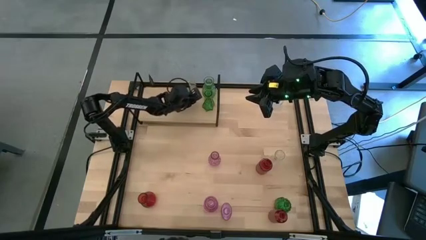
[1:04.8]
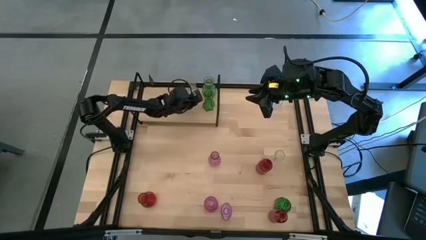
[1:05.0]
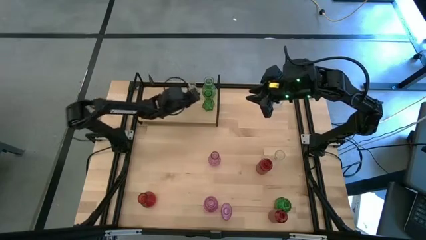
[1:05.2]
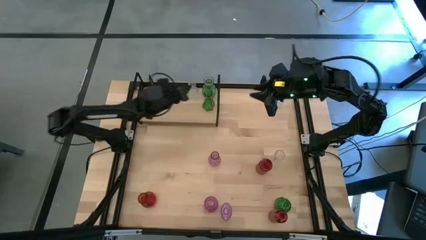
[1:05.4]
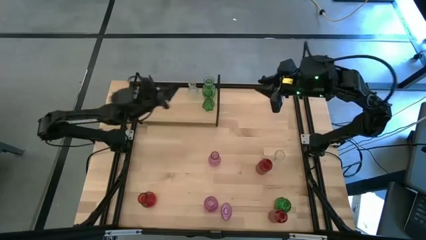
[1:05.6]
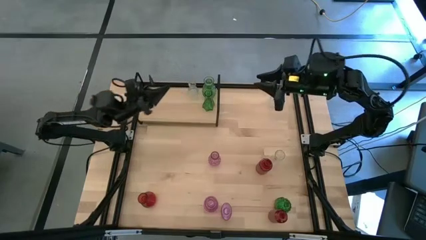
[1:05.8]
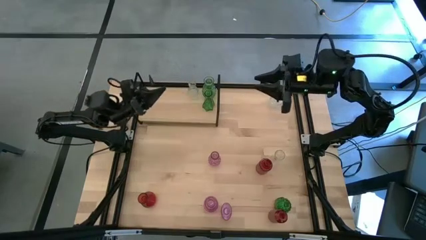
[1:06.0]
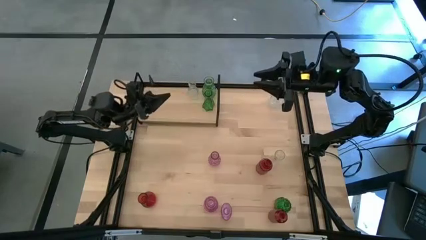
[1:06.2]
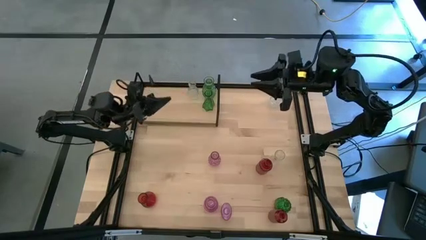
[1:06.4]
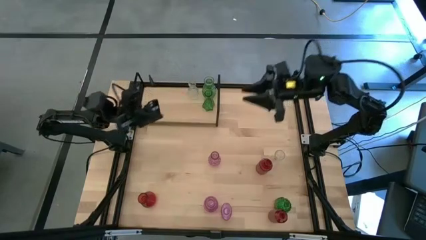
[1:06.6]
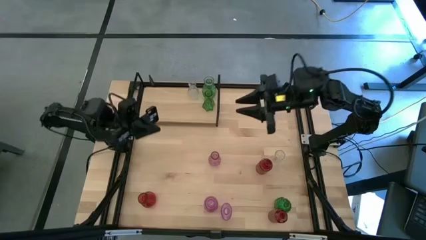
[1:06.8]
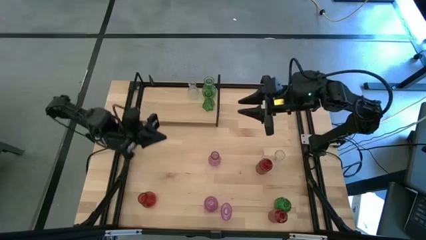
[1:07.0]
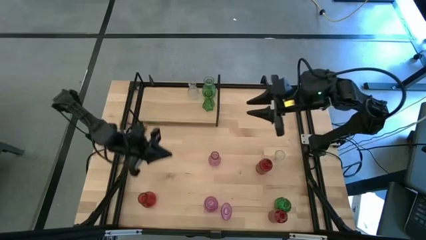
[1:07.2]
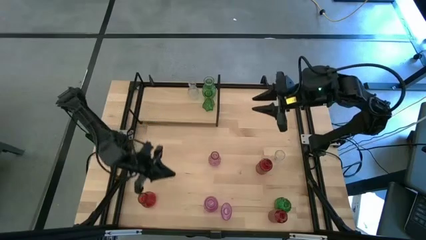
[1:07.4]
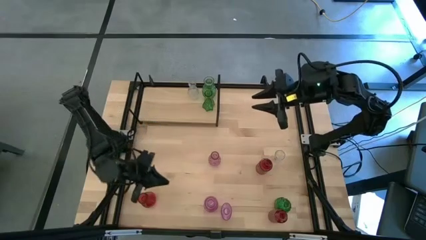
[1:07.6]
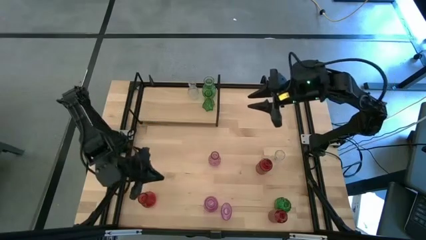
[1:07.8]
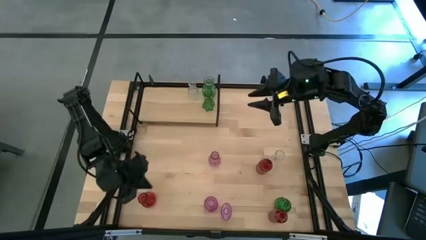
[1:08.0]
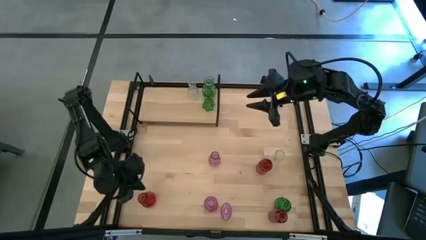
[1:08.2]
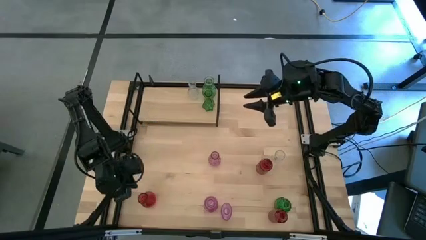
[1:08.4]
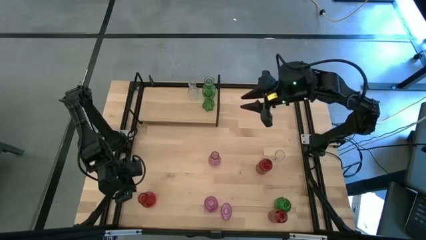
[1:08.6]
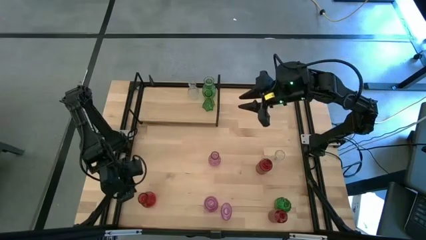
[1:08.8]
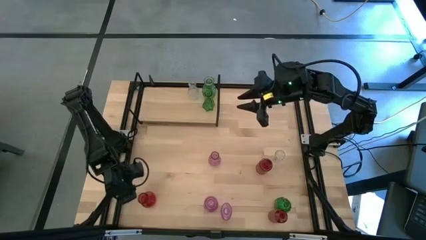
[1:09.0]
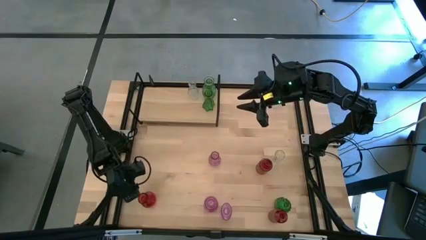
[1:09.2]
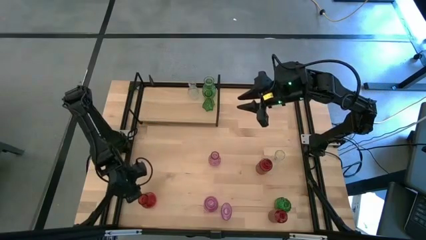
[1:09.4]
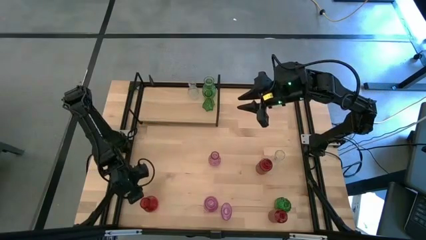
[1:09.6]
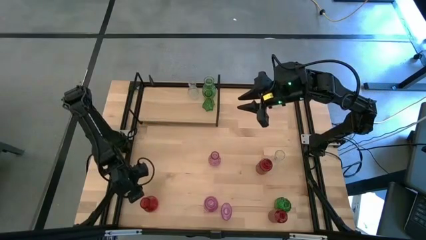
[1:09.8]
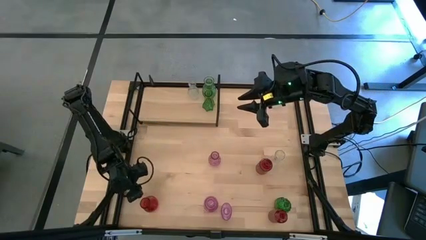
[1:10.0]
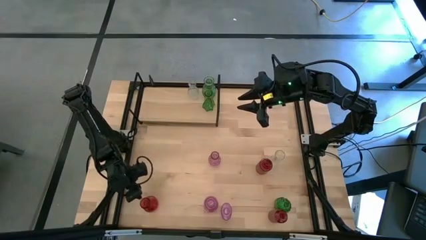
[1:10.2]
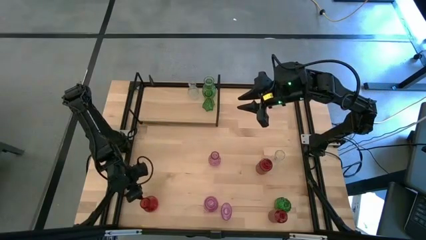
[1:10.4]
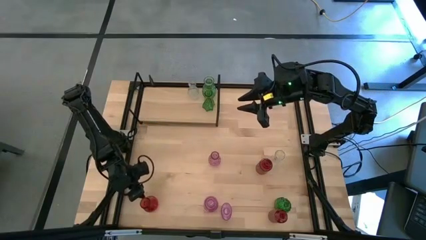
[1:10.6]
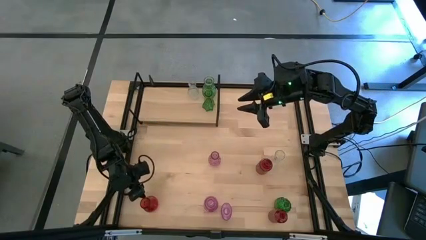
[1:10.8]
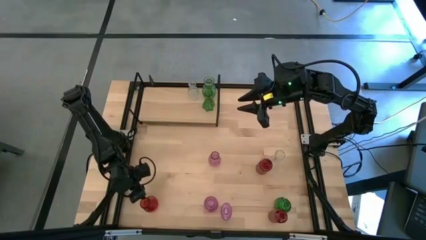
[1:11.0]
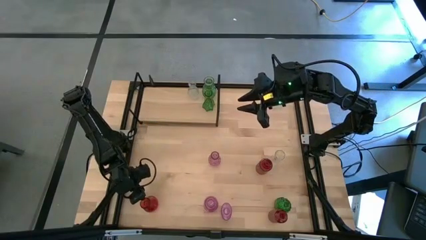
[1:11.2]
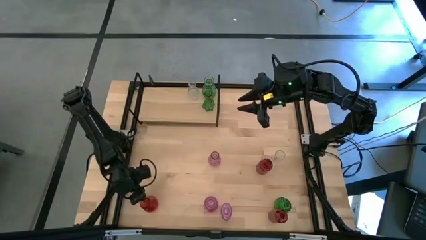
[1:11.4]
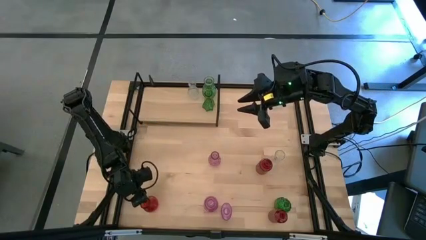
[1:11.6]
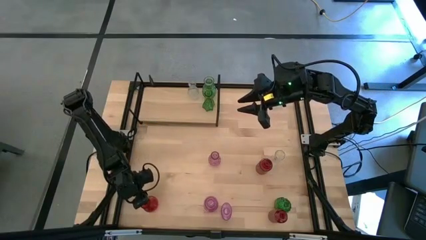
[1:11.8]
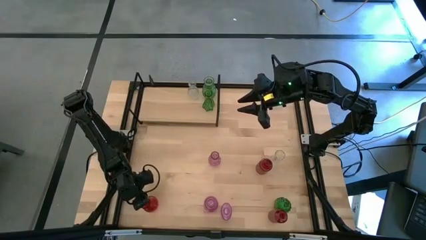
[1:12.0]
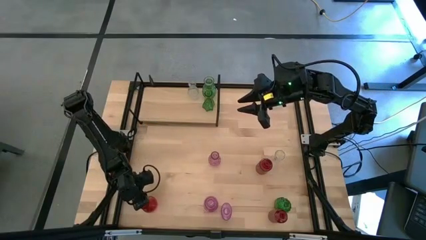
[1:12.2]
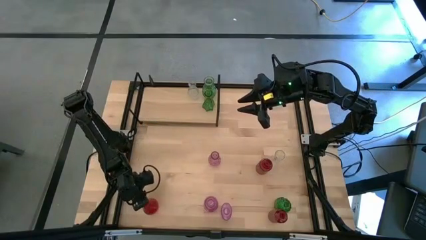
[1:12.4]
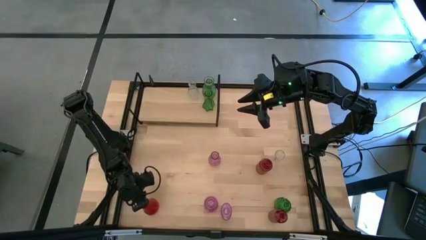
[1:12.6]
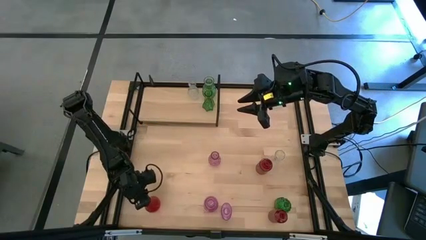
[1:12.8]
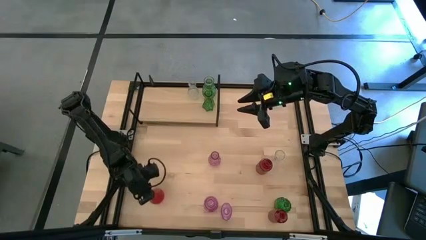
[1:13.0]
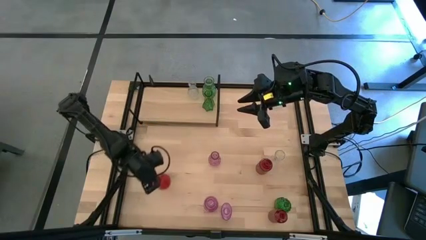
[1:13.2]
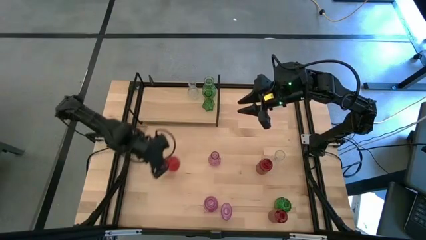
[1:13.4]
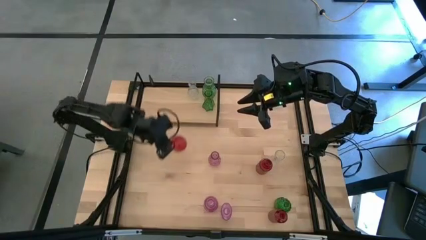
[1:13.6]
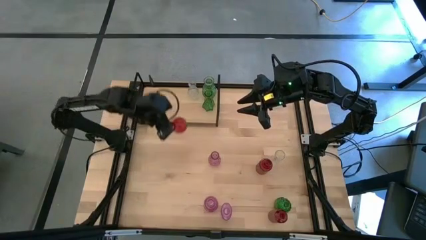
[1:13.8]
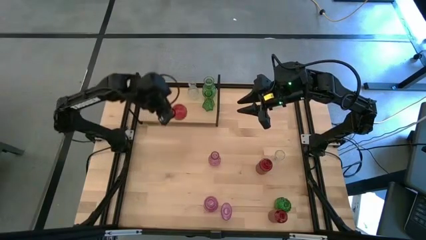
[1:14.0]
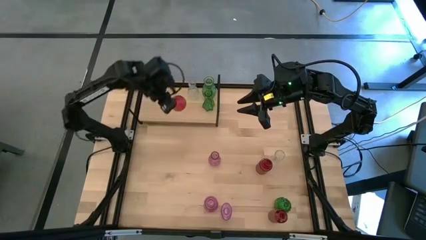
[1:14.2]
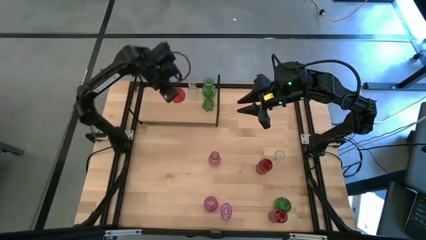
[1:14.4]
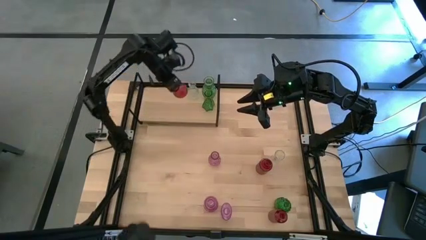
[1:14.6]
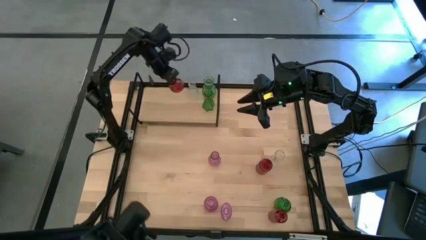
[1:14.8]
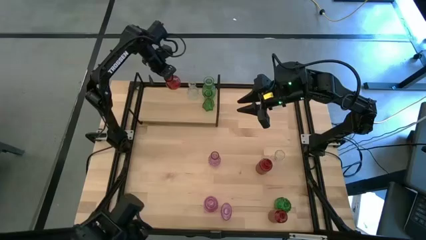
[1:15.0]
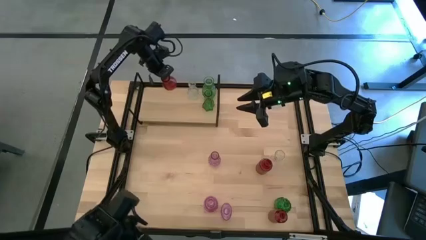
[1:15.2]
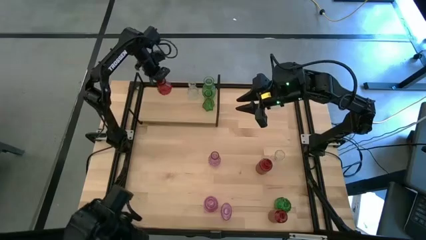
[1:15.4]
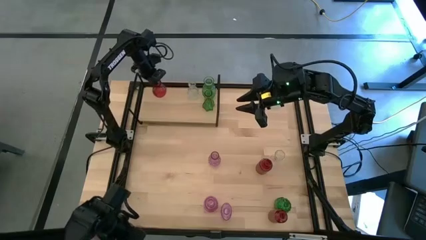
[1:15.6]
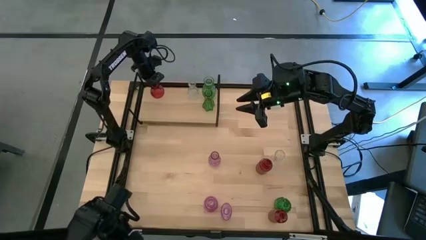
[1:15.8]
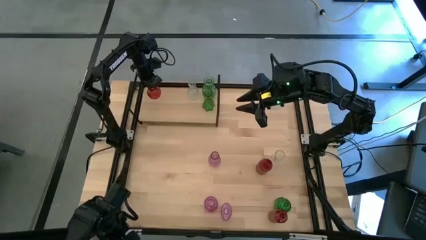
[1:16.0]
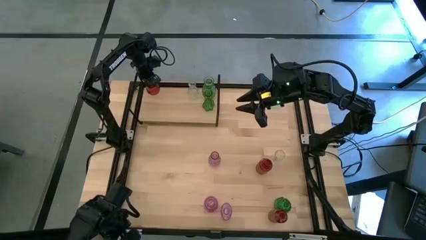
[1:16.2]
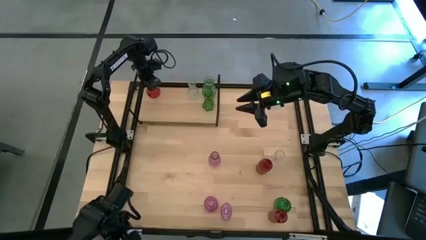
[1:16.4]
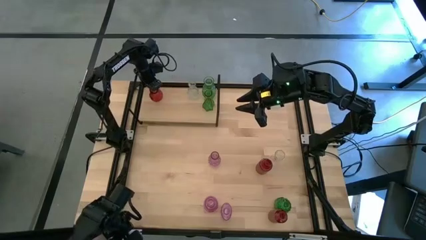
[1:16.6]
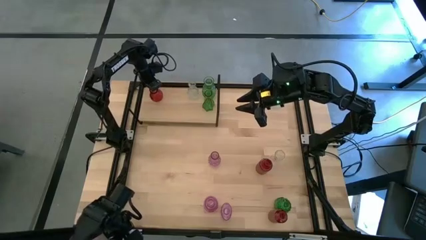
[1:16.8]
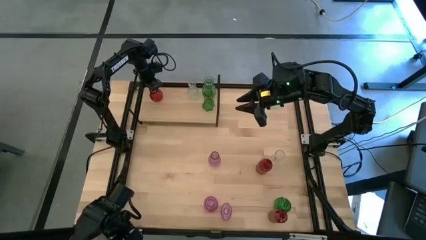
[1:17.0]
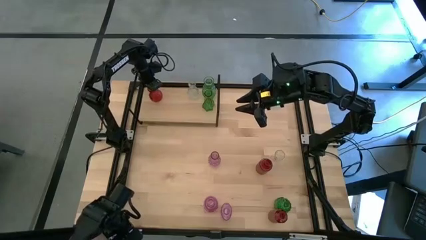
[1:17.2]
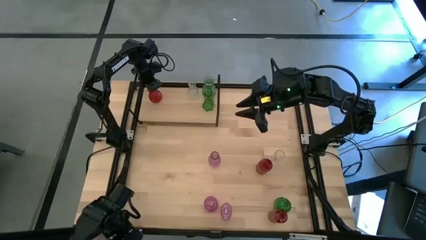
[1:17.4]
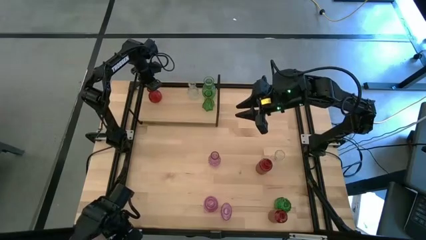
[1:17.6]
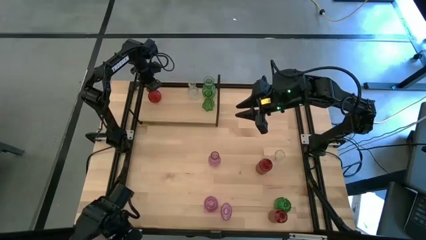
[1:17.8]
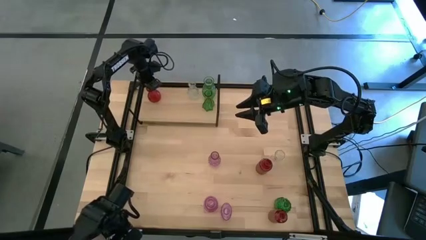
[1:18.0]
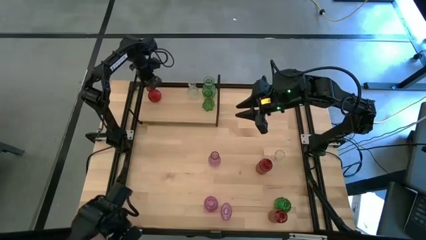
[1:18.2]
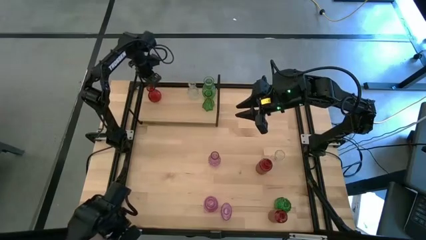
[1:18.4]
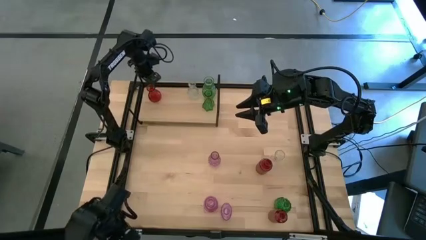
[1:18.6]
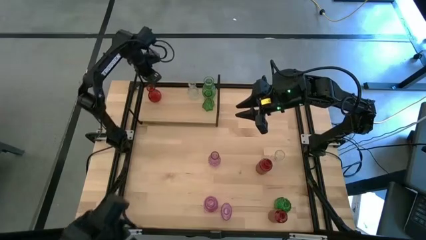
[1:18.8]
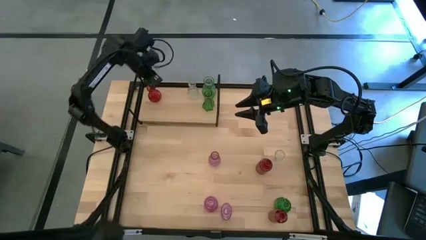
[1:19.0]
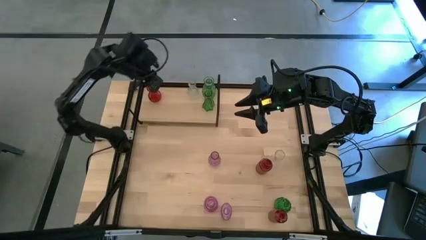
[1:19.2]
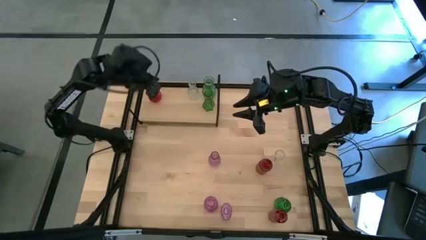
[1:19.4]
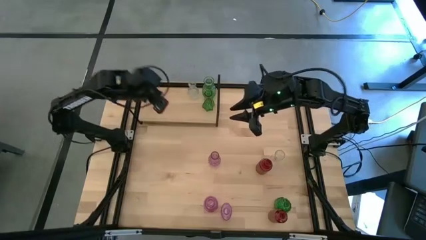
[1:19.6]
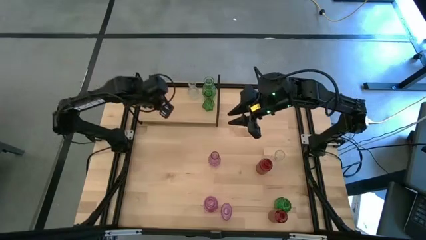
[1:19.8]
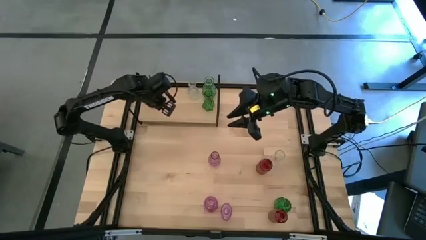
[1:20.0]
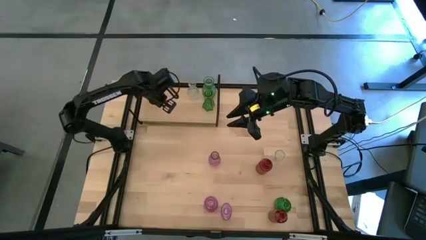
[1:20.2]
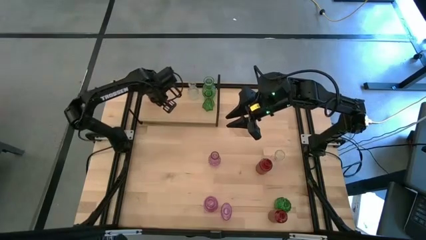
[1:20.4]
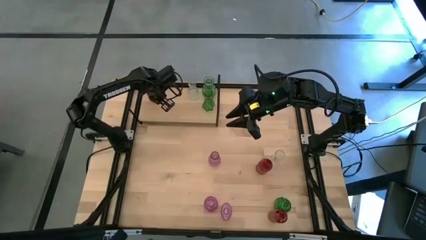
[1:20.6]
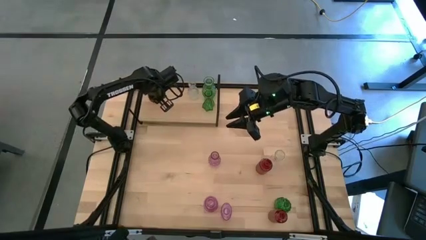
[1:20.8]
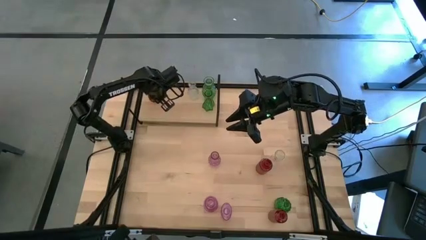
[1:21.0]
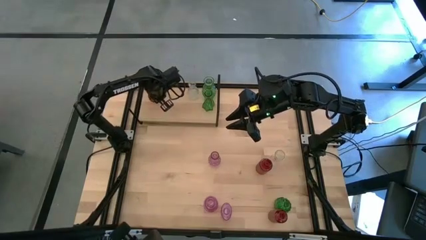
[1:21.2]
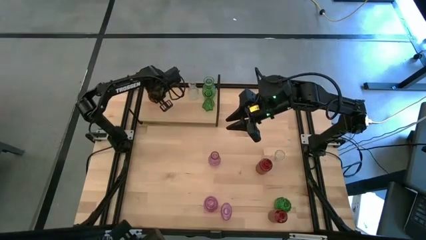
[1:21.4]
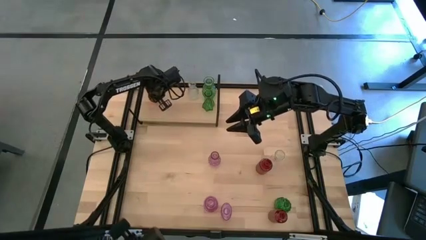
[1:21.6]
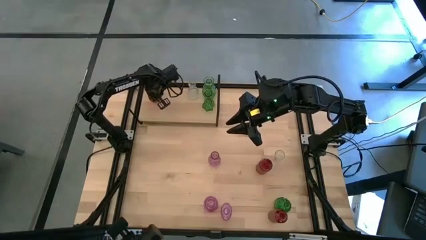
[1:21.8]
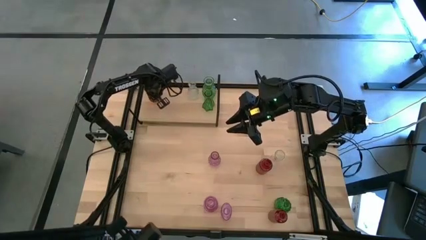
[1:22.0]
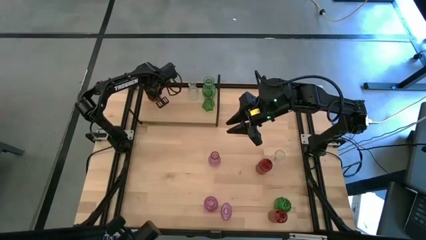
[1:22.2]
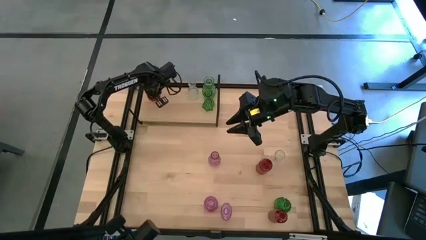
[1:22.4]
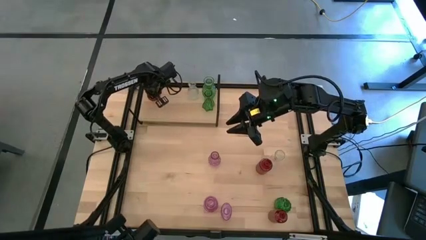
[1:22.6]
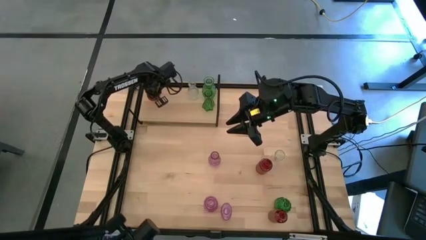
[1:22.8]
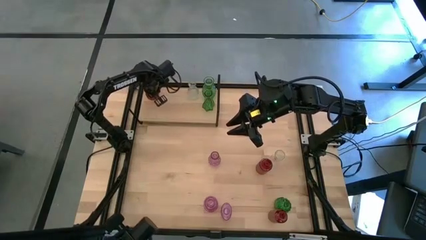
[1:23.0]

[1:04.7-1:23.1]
Task: sort vases onto shelf
Put the bottom left red vase on the shelf
